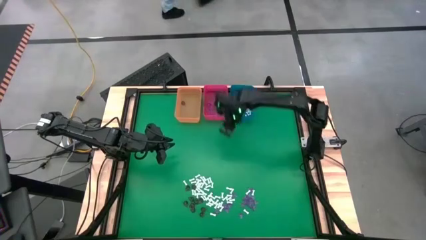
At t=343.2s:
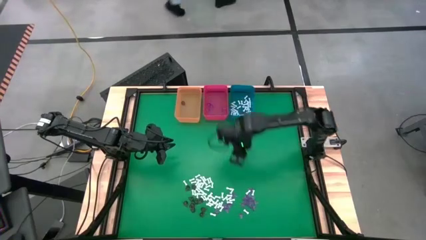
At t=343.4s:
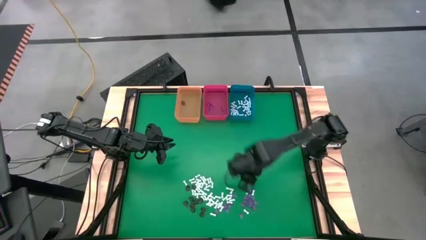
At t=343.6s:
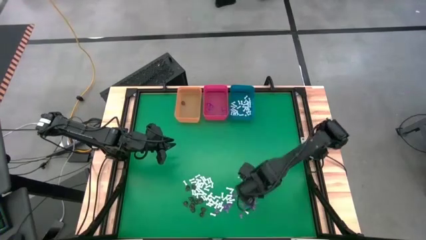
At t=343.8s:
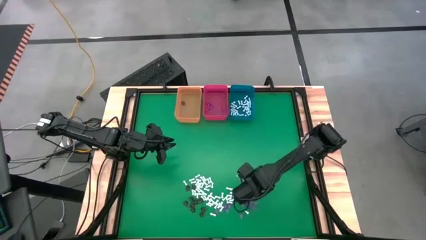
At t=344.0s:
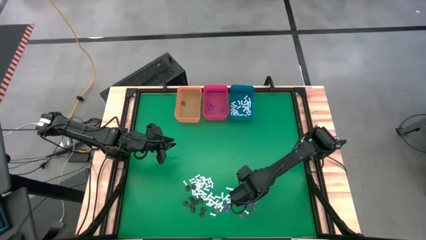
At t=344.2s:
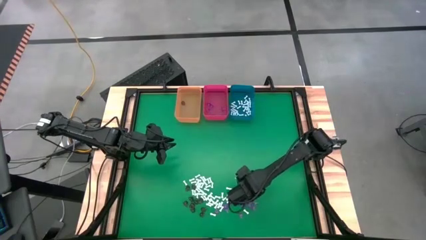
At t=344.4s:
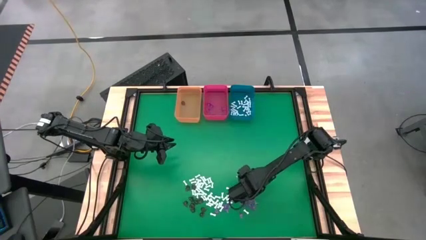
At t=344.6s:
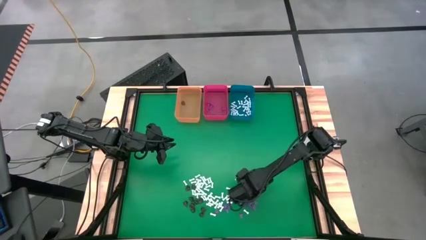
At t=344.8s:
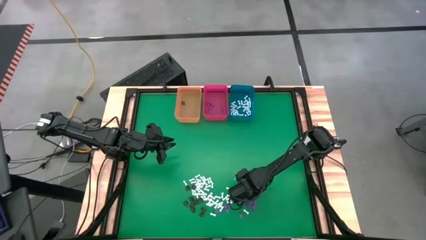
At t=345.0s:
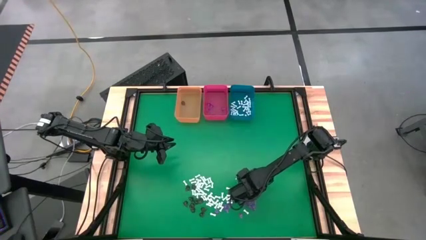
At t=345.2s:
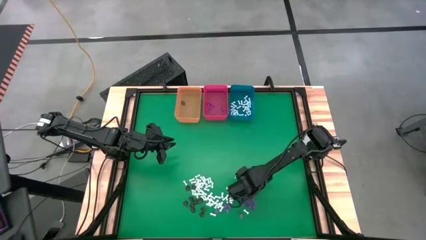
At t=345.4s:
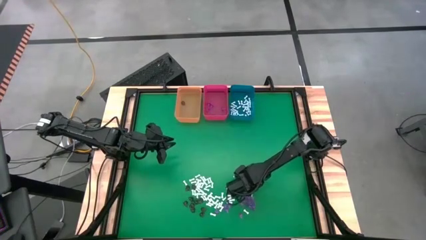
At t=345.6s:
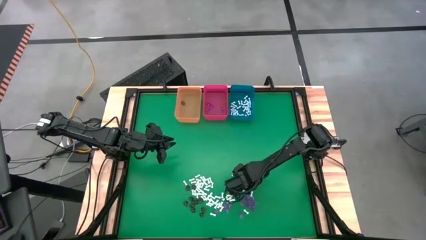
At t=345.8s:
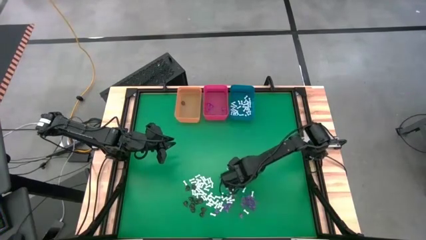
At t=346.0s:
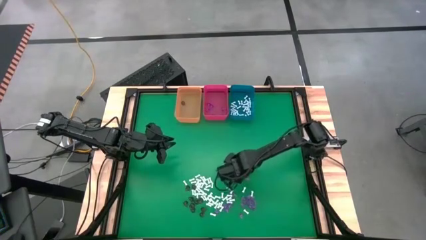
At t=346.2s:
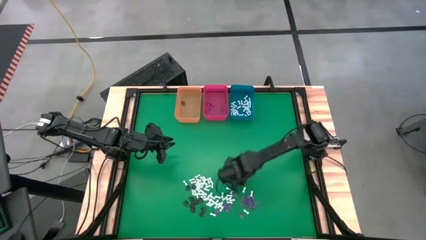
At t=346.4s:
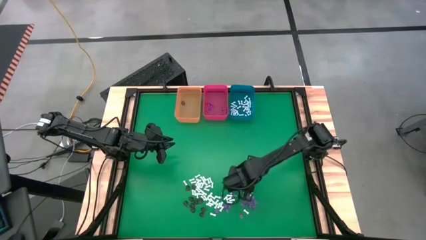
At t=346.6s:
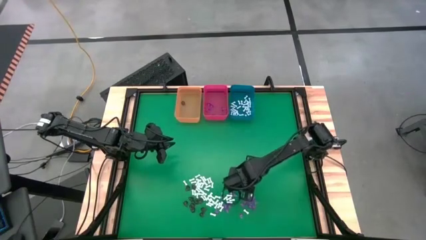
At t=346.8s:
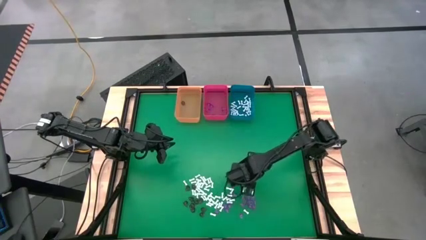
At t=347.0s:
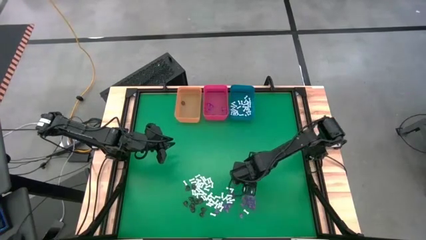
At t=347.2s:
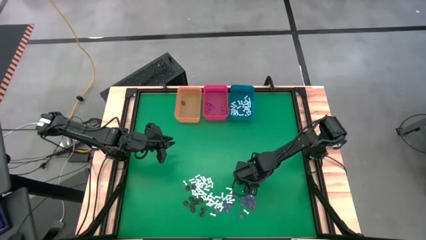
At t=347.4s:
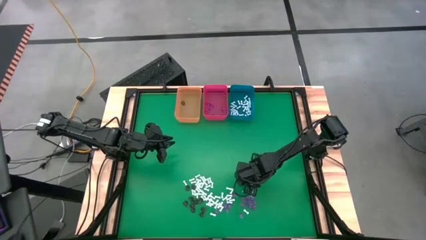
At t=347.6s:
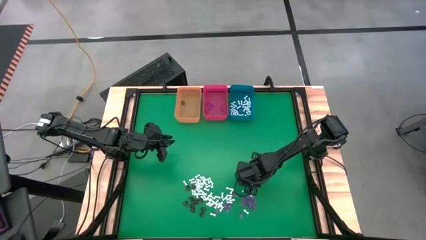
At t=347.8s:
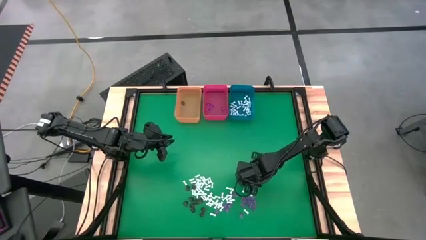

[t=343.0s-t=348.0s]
Task: Sort Halloween decoration
Put the violet witch hat toy into the red bin

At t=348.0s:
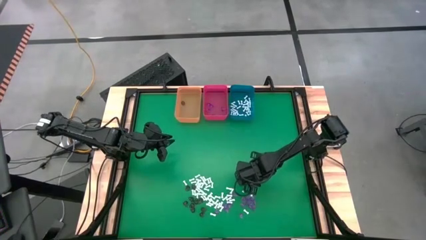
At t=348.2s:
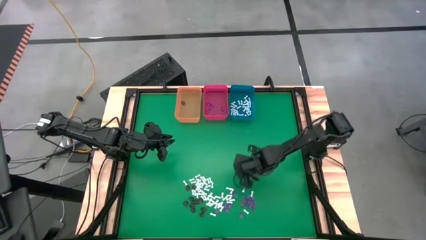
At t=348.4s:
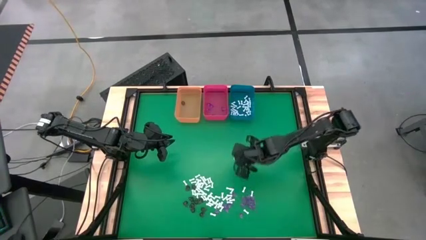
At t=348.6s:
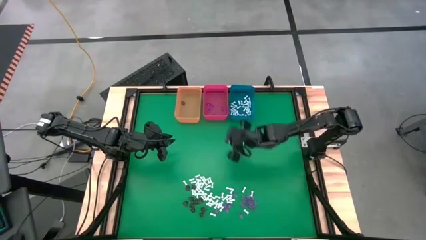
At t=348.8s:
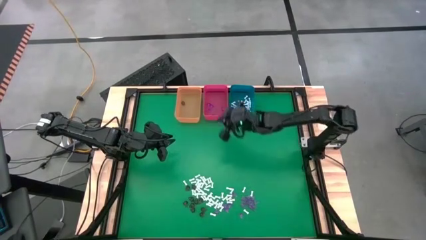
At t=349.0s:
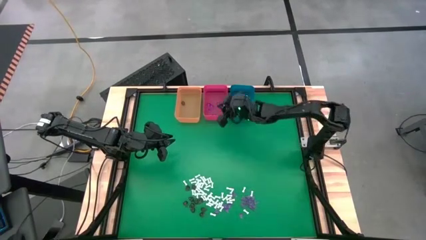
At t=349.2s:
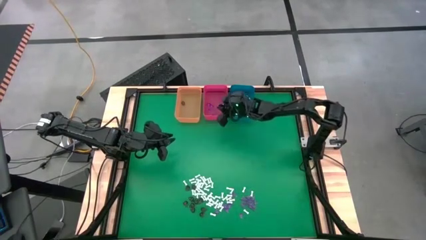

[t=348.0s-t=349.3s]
Put the violet witch hat toy into the red bin

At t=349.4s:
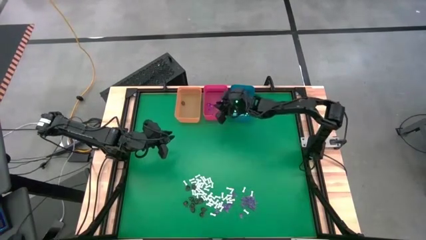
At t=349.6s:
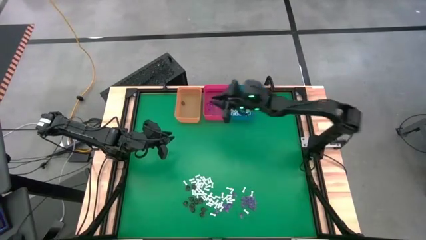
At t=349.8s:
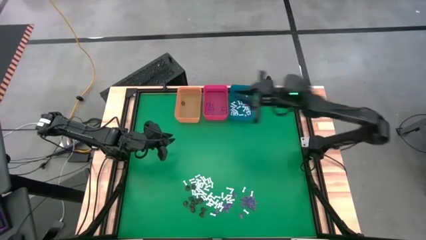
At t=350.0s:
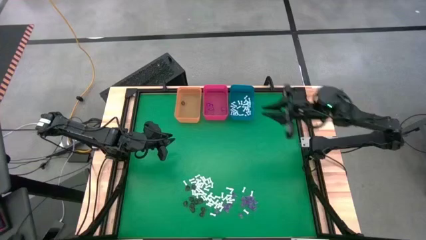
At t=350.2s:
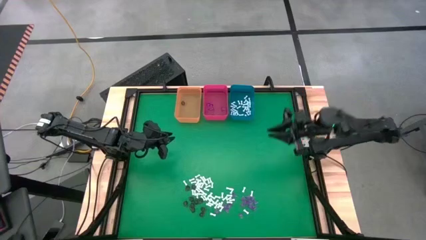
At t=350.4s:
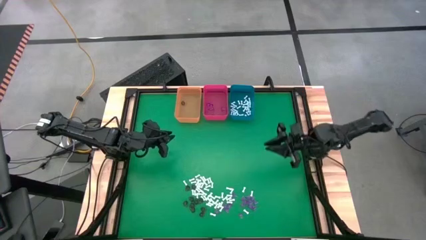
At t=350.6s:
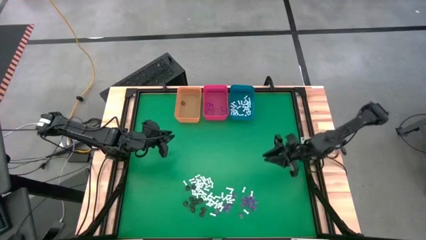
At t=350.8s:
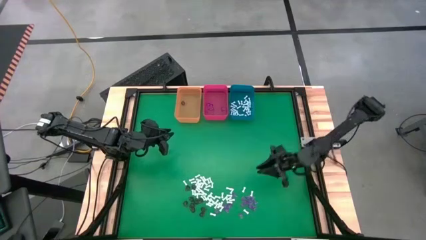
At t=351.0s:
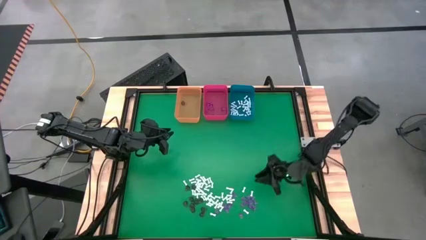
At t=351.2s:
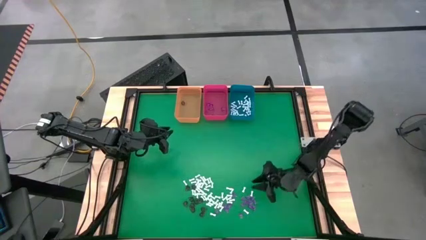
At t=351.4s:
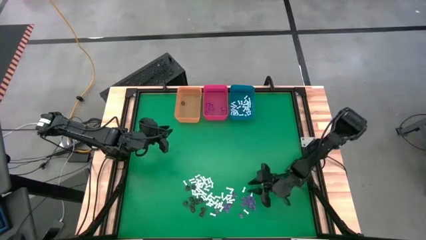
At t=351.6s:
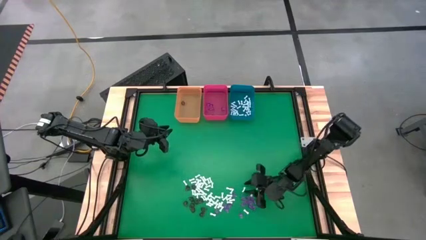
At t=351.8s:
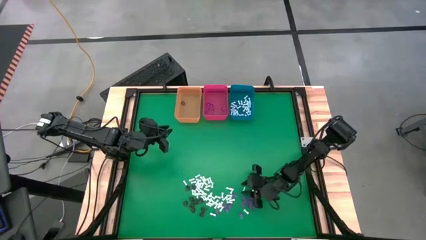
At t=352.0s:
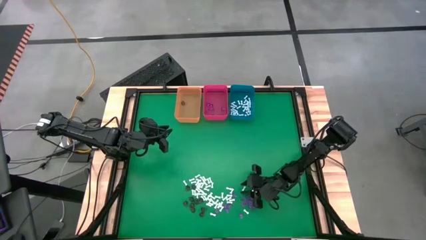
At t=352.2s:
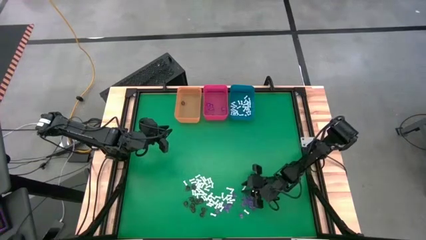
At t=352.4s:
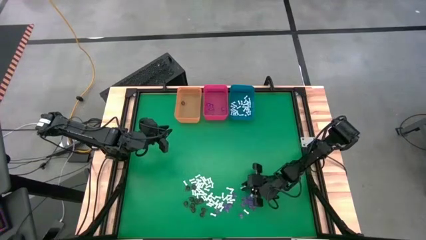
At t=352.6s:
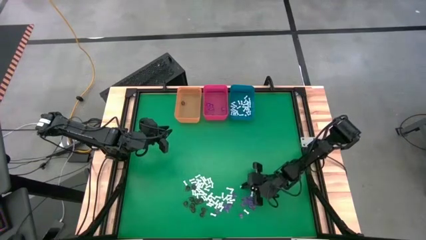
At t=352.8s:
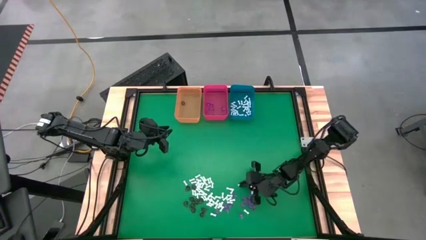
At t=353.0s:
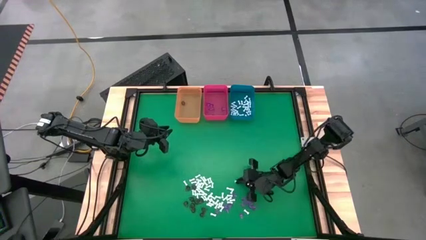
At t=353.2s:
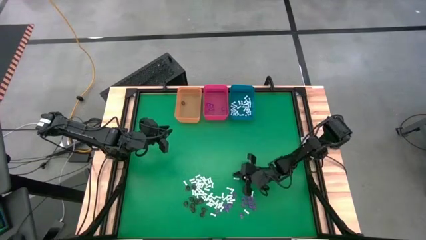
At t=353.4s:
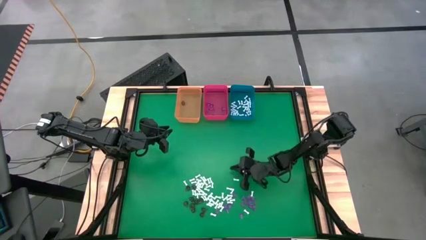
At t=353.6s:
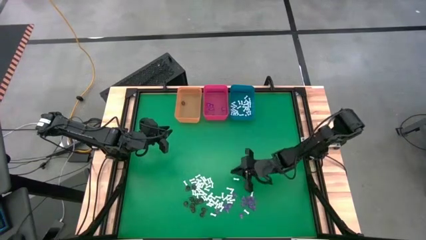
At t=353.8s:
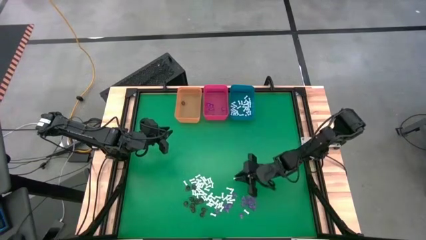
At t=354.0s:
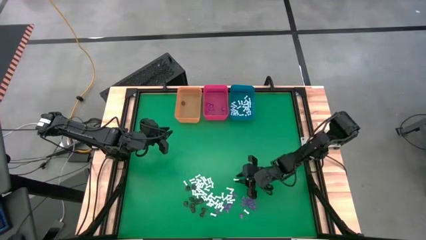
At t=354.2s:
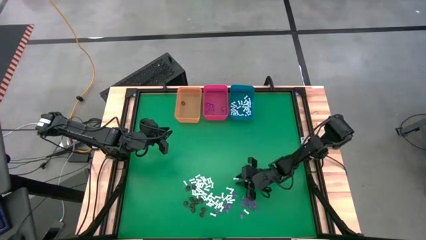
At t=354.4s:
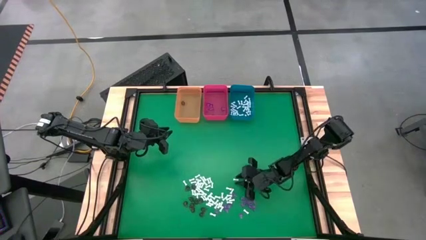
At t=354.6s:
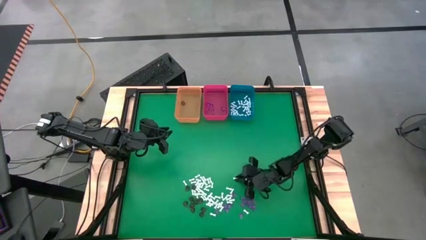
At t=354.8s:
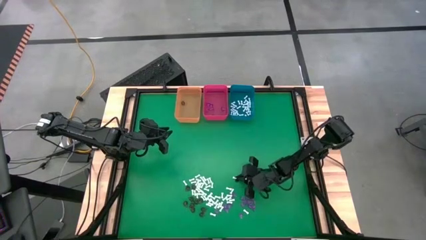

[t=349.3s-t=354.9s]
Put the white bone toy into the blue bin

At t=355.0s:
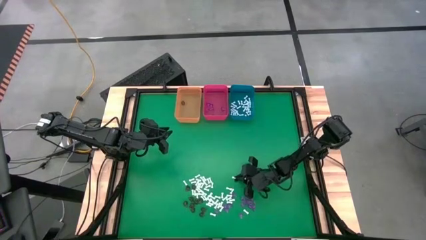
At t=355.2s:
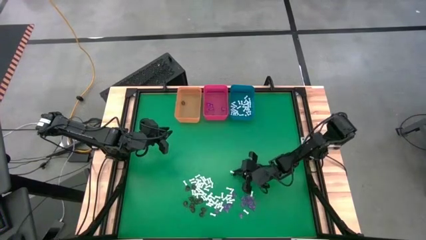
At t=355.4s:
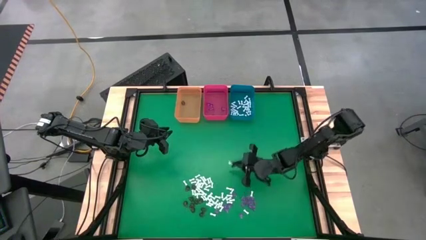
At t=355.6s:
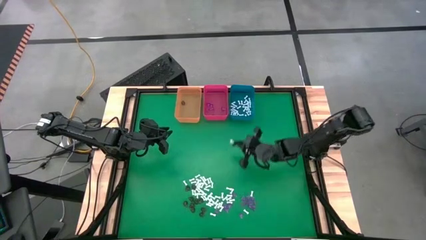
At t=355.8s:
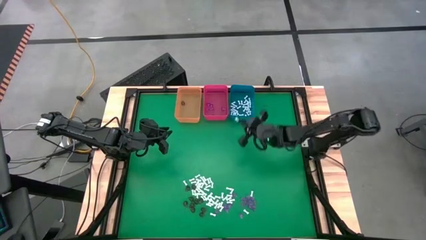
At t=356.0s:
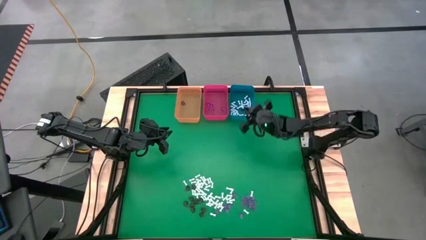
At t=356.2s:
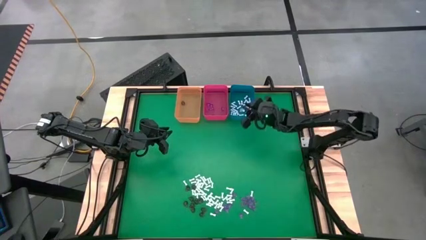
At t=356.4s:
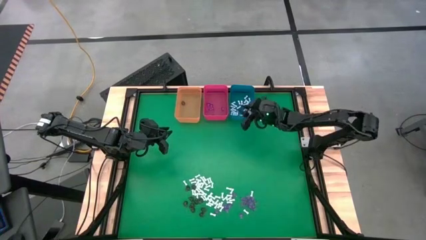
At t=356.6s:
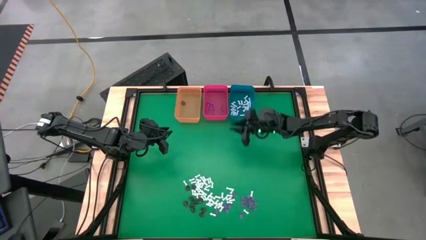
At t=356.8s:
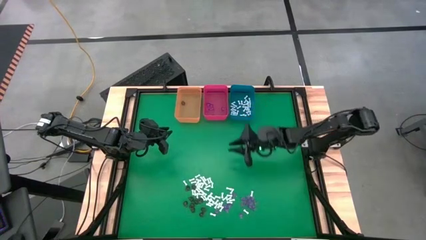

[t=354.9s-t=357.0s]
Put the white bone toy into the blue bin

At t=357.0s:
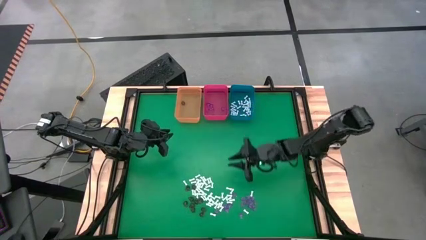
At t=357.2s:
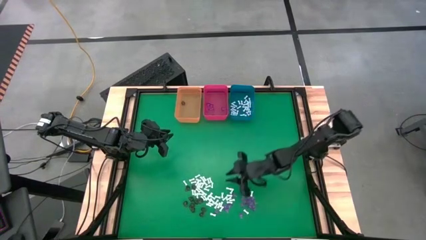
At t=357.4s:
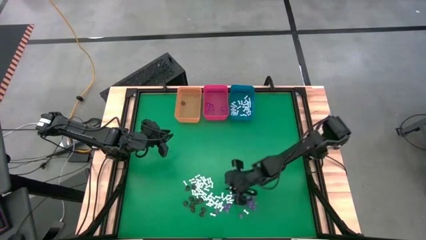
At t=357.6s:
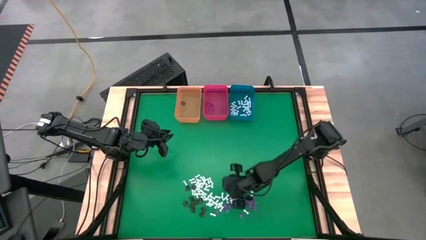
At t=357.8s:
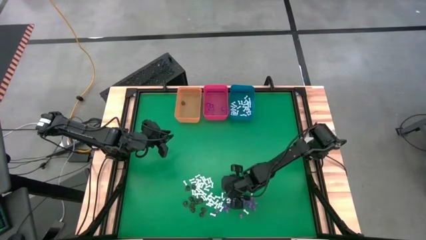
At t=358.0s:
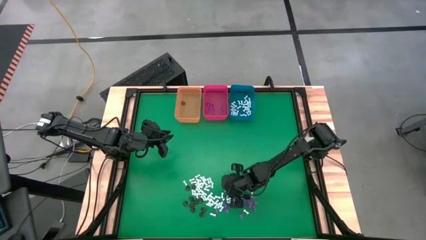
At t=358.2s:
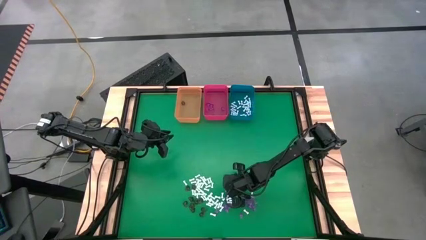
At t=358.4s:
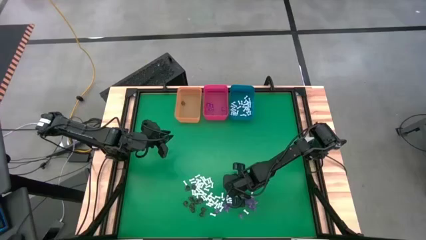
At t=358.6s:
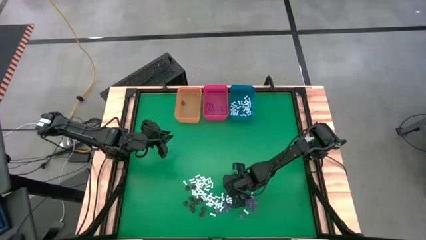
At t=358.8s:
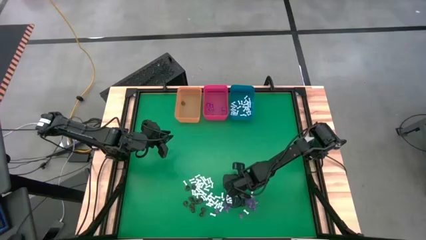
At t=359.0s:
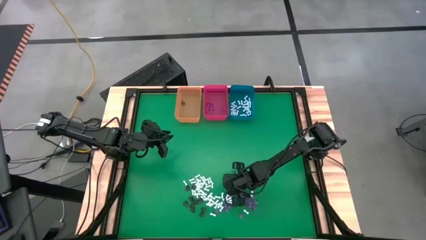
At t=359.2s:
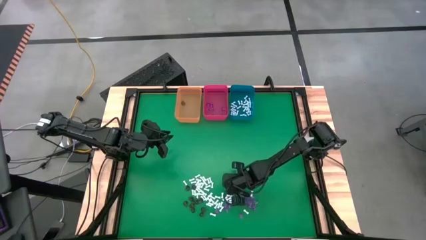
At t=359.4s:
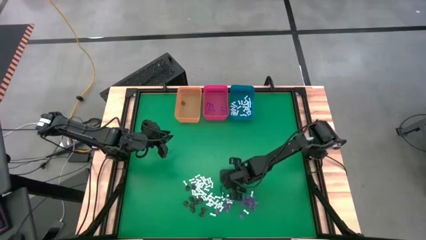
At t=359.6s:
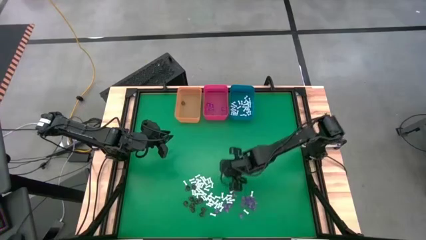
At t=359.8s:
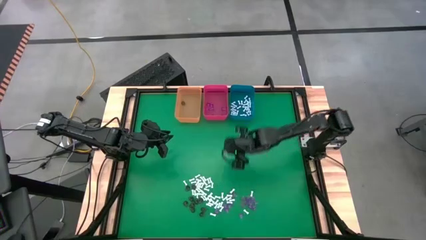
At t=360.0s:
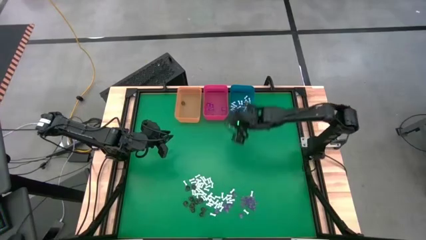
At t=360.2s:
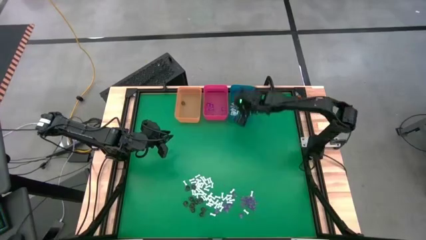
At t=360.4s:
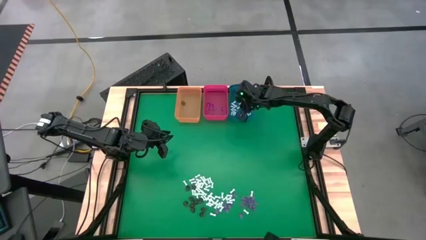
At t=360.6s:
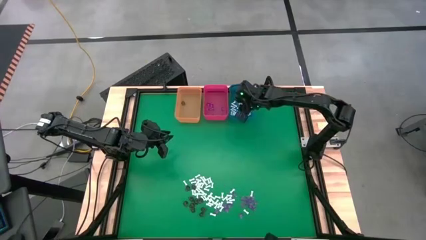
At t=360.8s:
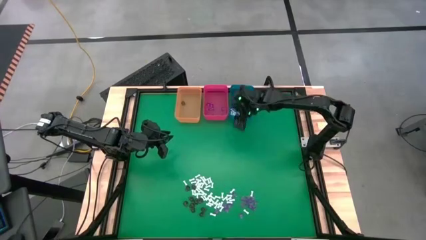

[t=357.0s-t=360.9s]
Put the white bone toy into the blue bin
